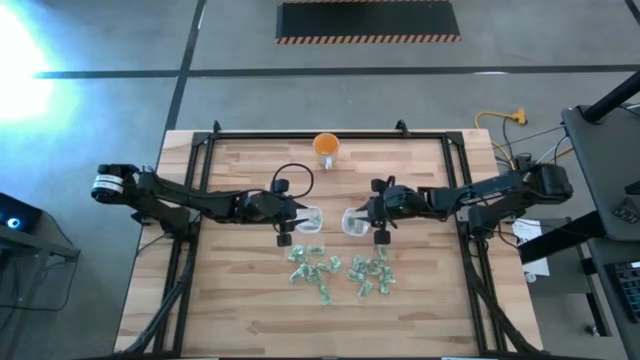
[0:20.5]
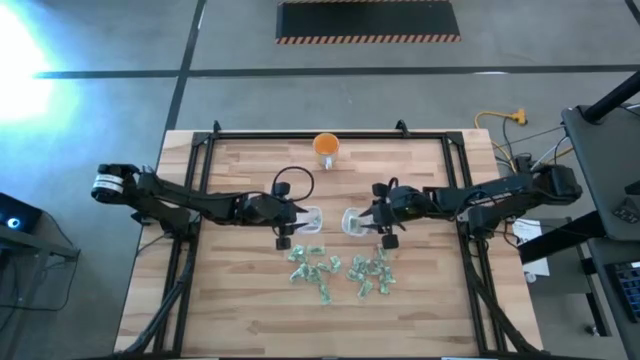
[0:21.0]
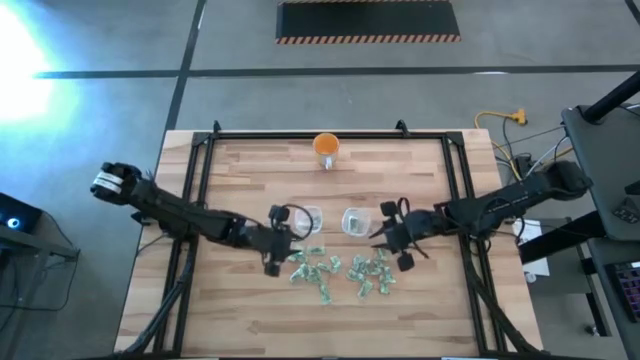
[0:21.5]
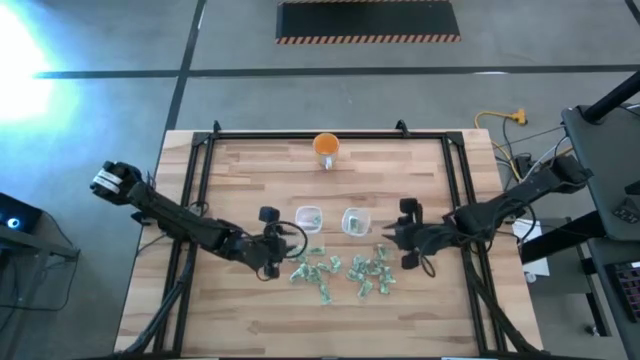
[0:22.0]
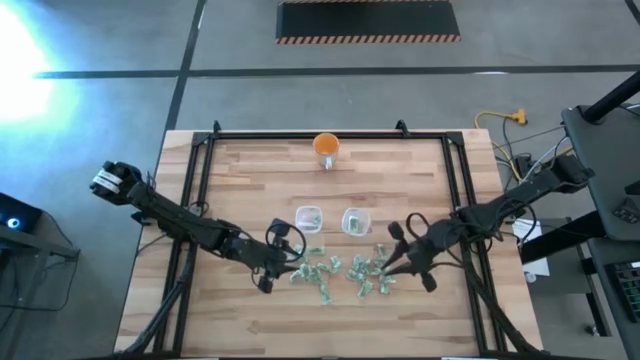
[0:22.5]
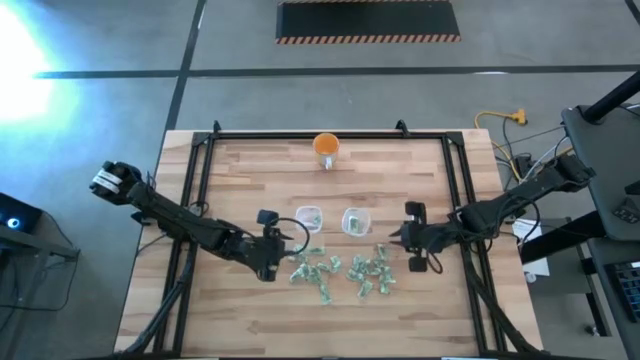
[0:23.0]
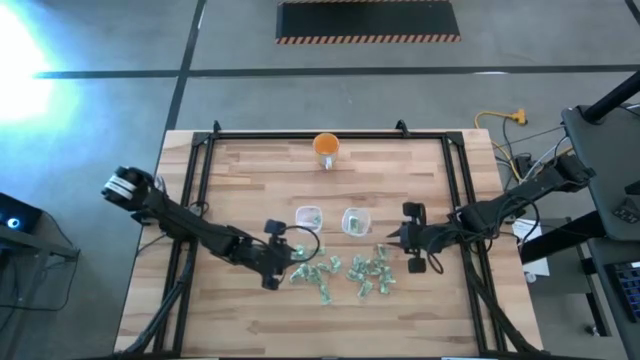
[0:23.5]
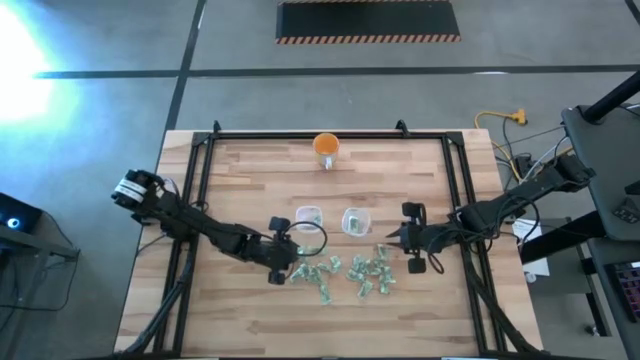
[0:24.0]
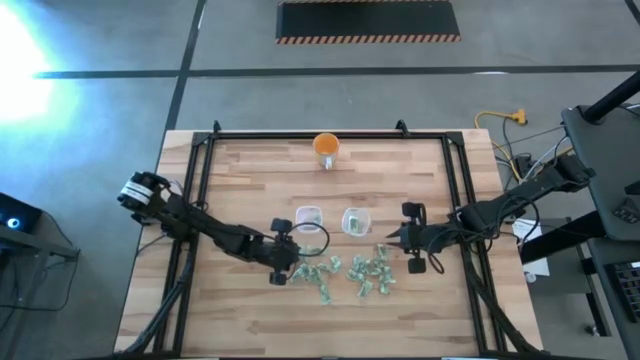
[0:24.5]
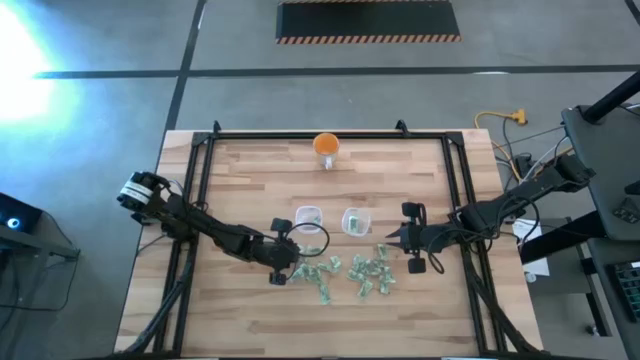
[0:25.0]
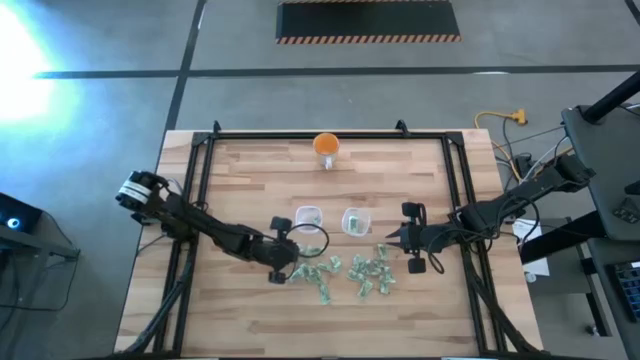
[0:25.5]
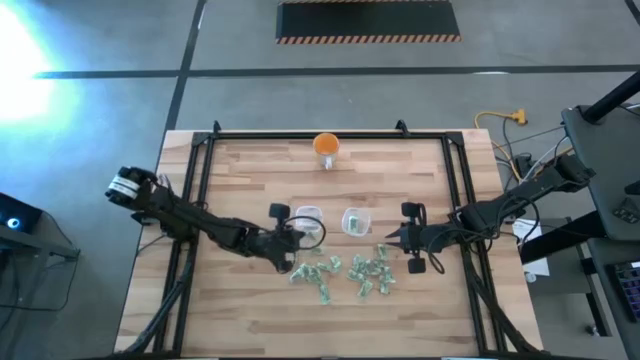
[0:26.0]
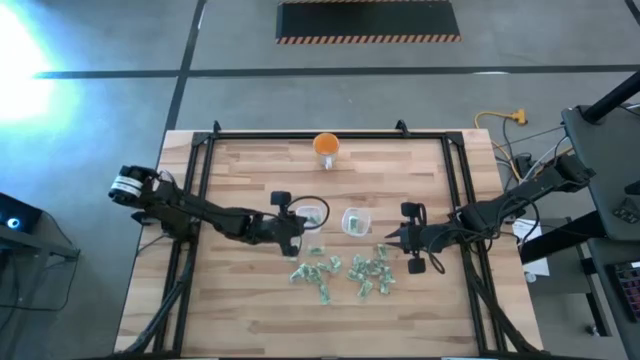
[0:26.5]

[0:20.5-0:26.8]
Task: Pick and place Stevia / Truvia into bins
Put the green stevia packet into the left transparent container

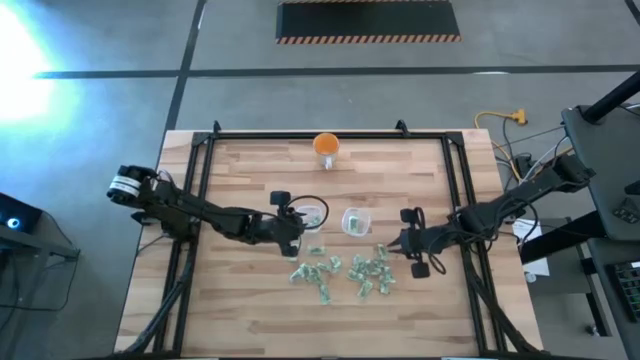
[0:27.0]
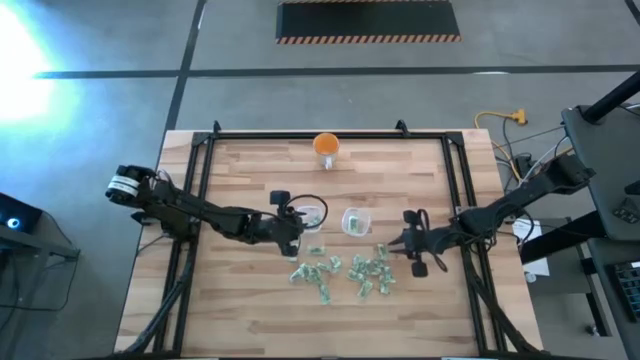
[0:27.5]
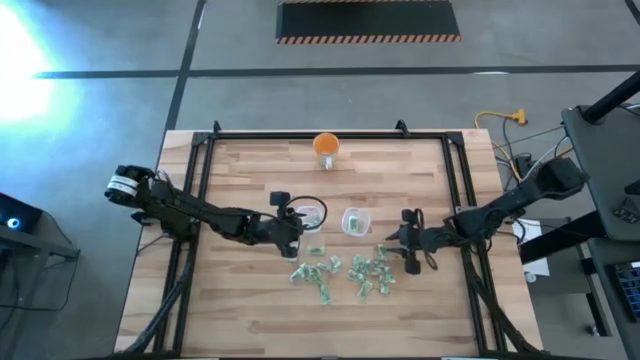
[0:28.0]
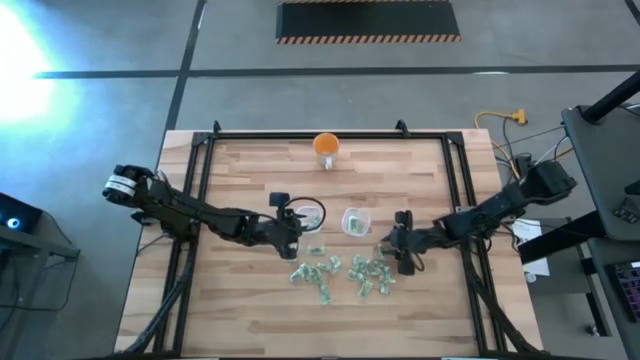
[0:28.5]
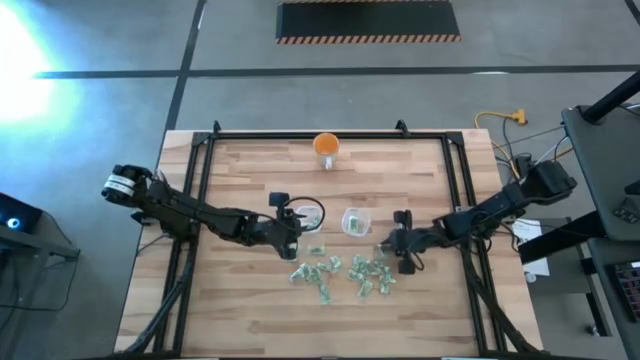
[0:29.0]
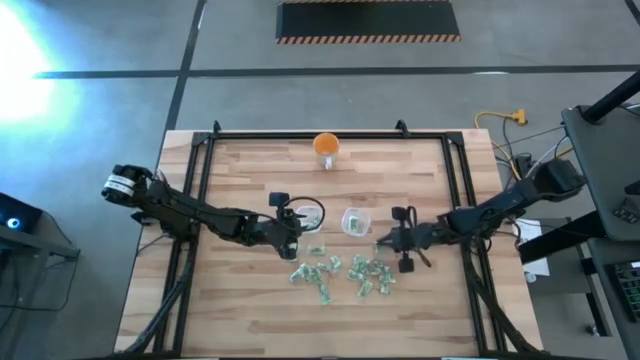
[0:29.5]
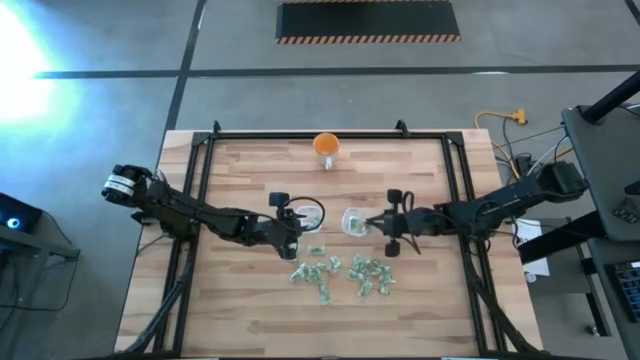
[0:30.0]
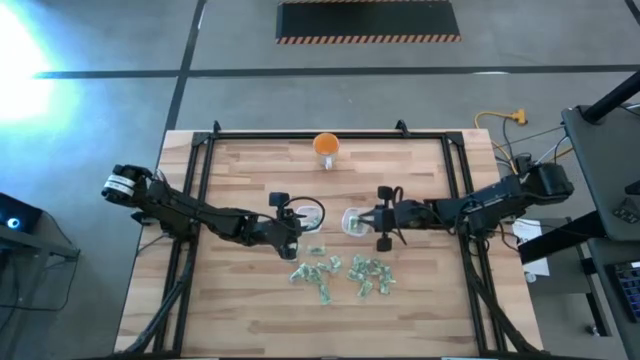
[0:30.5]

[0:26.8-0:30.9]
Put the green stevia packet into the right transparent container

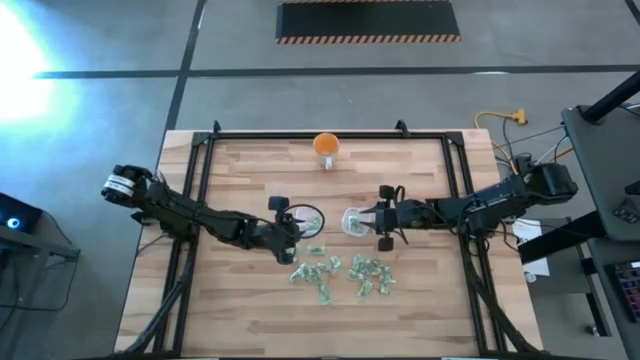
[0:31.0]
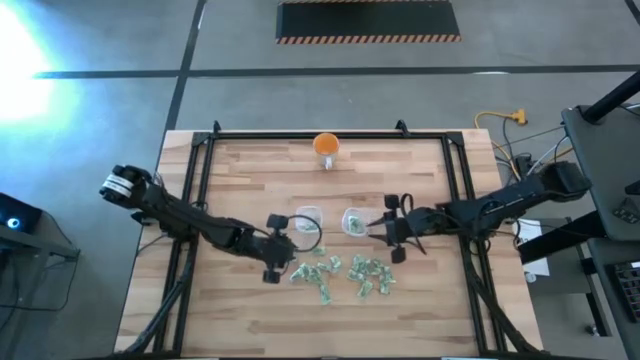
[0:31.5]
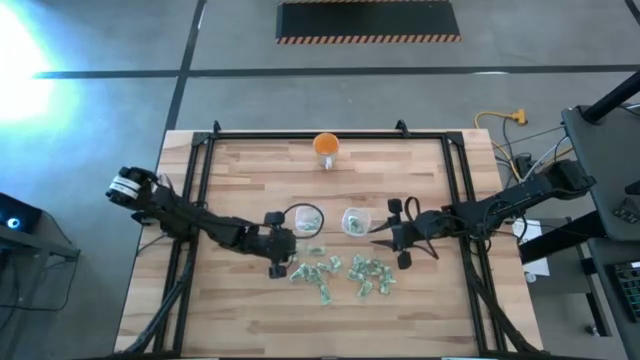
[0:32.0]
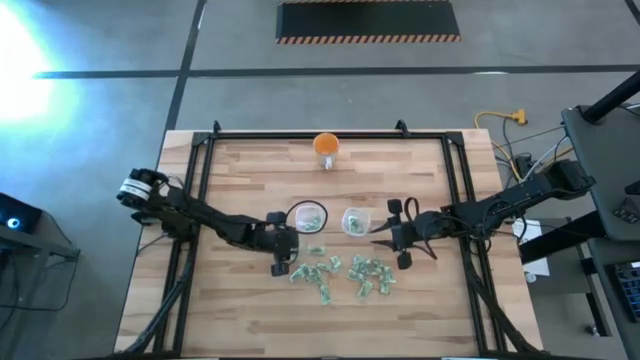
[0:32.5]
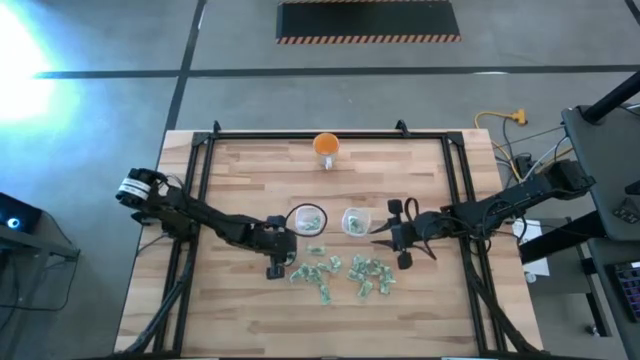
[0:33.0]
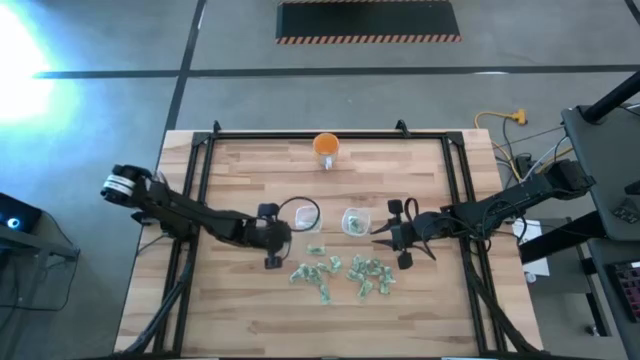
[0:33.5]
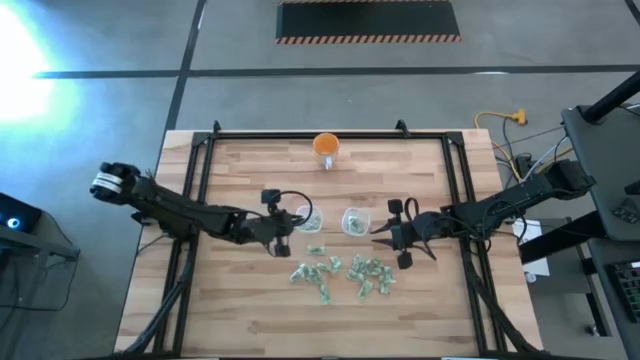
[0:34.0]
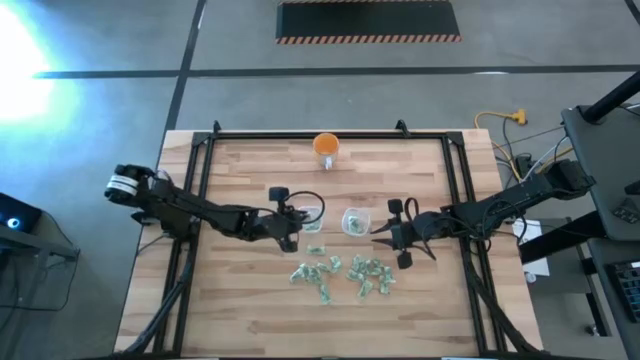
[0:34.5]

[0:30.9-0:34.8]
Put the green stevia packet into the left transparent container

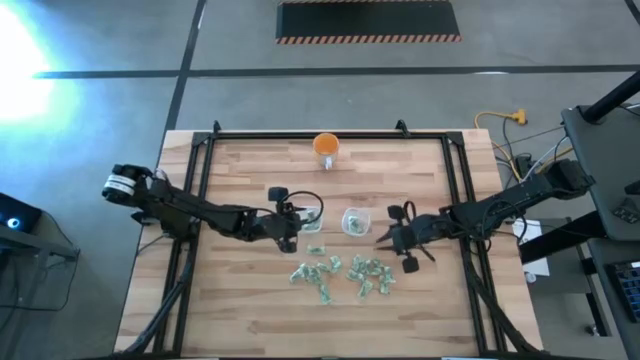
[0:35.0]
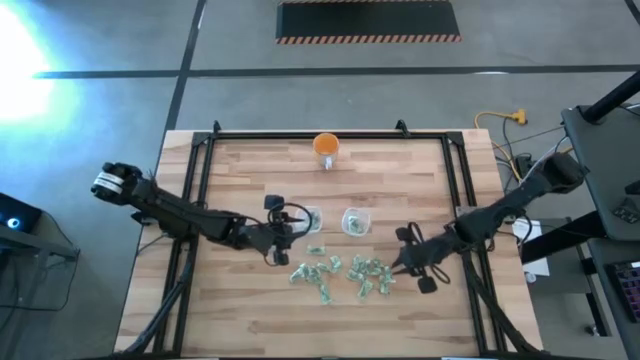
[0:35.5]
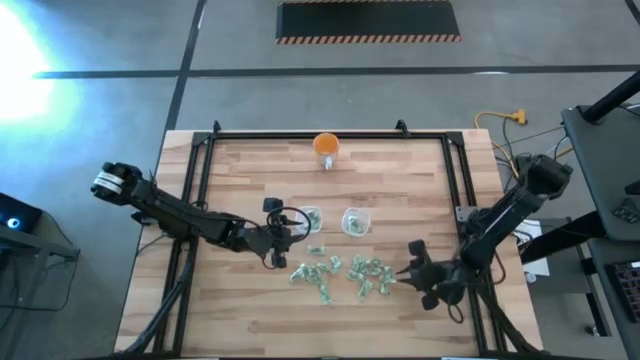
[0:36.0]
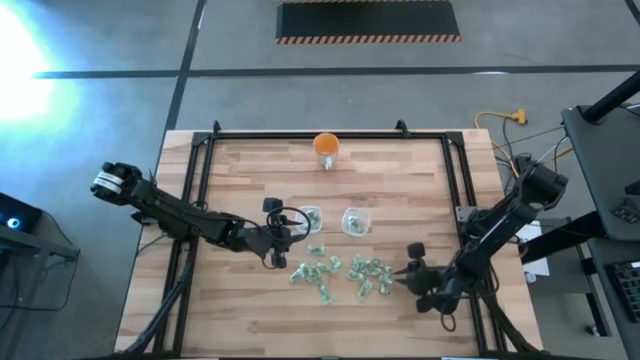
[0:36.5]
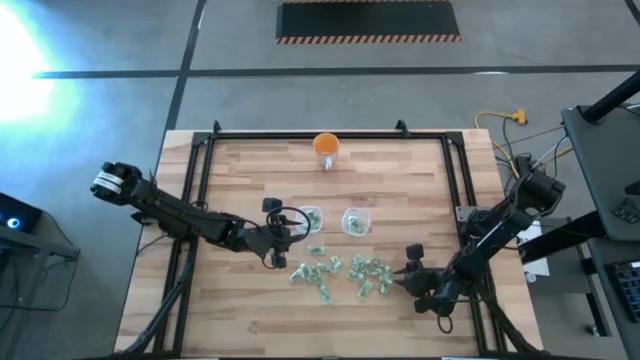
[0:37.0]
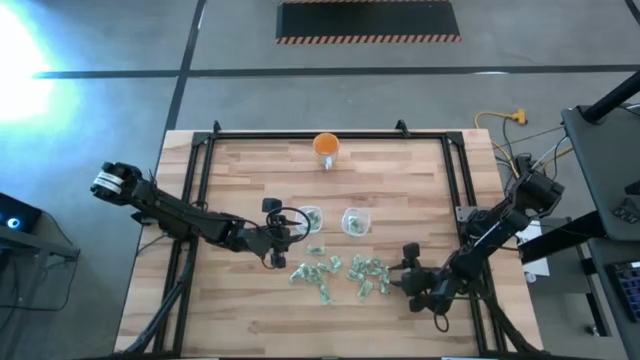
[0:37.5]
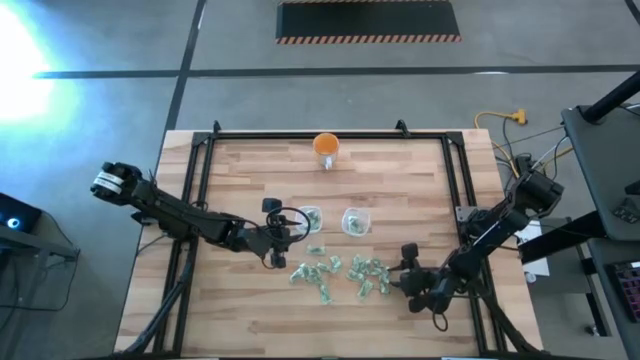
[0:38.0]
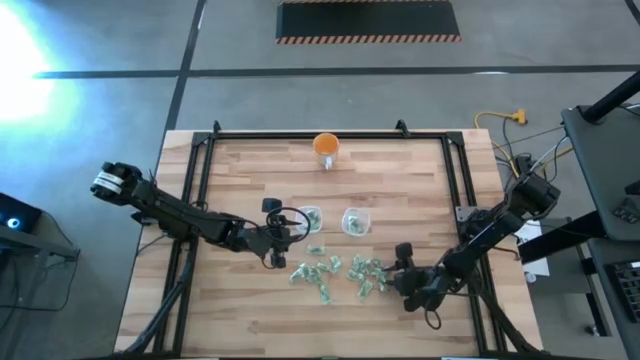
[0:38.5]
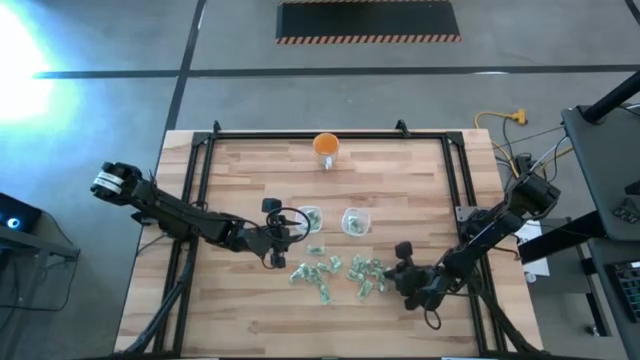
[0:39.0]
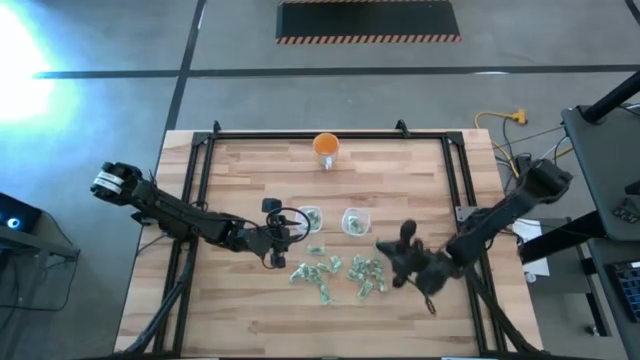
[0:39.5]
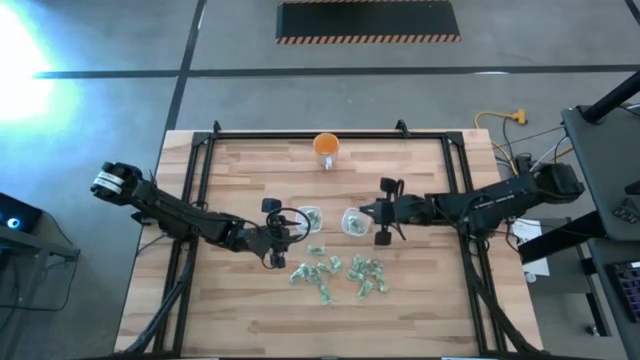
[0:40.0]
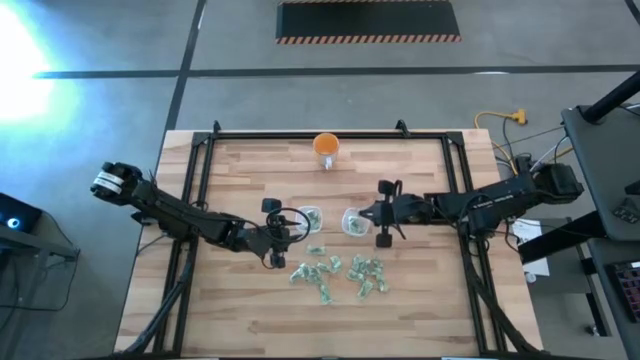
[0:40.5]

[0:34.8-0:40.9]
Put the green stevia packet into the right transparent container

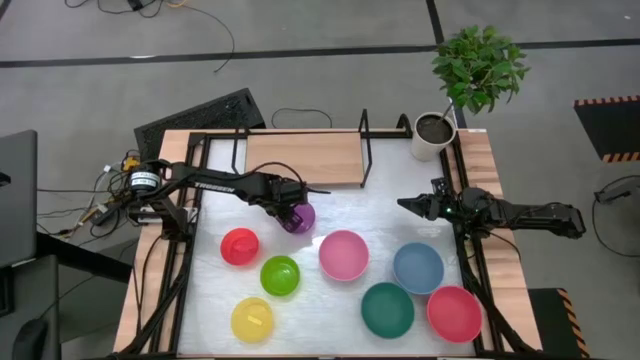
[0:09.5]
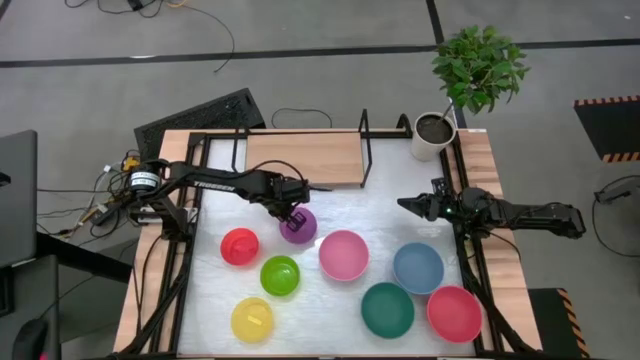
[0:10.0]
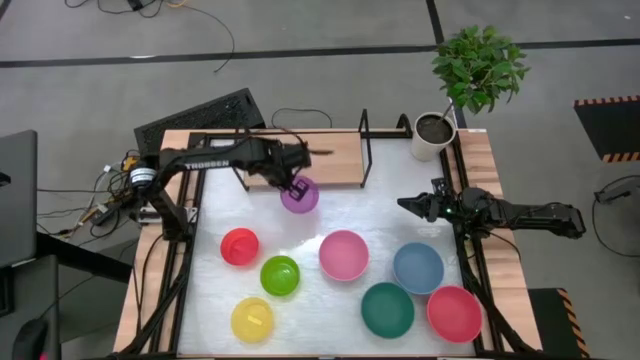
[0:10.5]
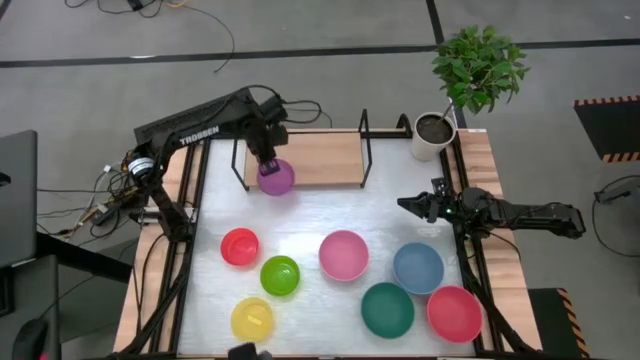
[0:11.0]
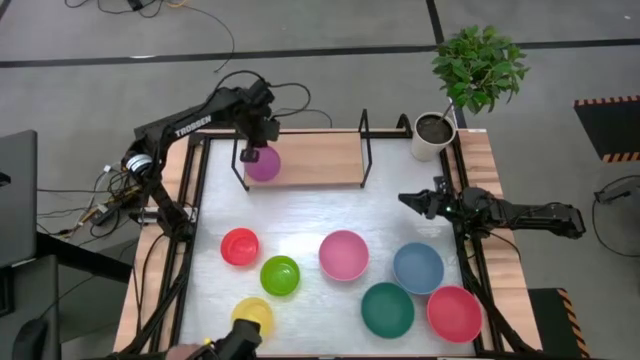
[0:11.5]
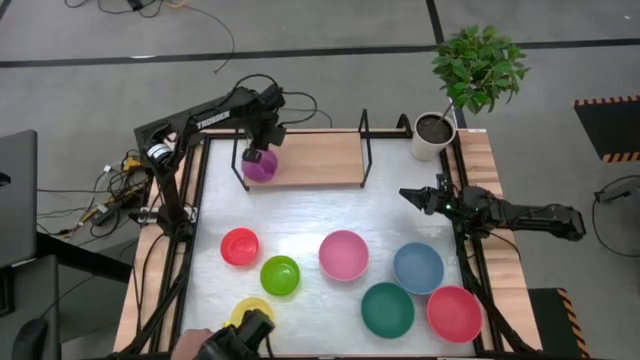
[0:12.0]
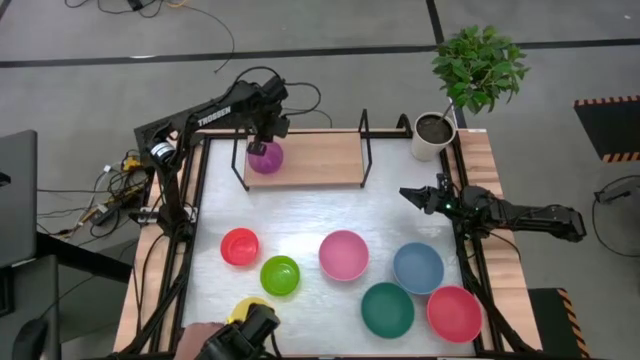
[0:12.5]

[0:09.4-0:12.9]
Task: Place and stack bowls onto a shelf
Put the purple transparent bowl on the shelf
